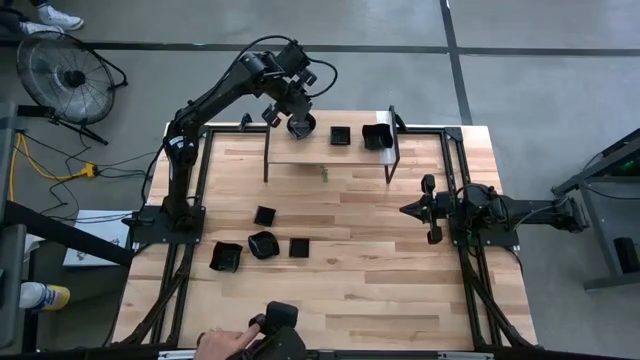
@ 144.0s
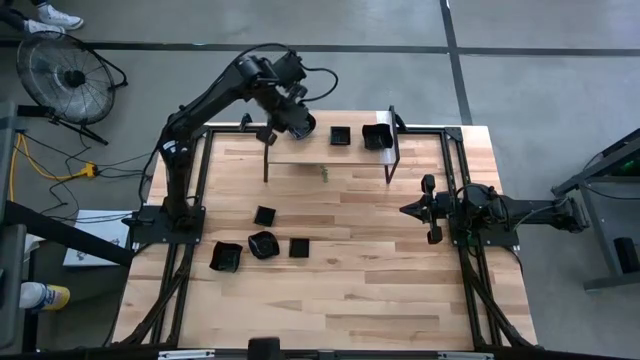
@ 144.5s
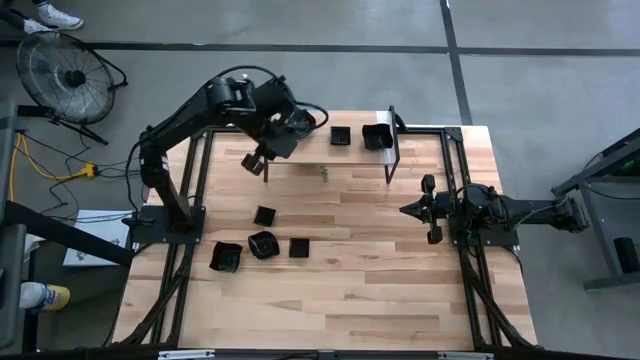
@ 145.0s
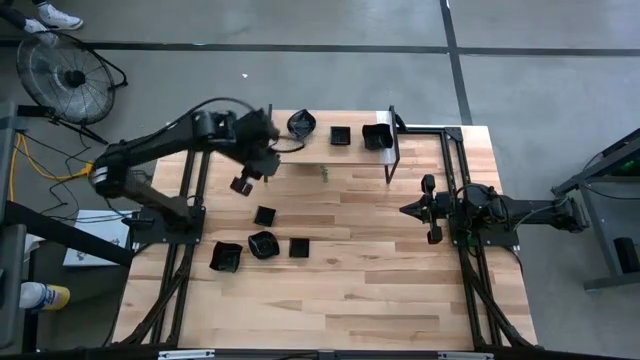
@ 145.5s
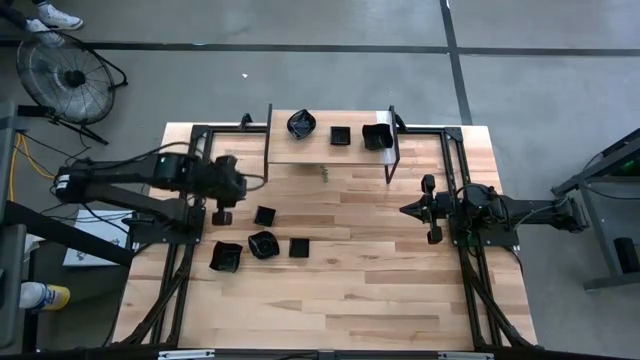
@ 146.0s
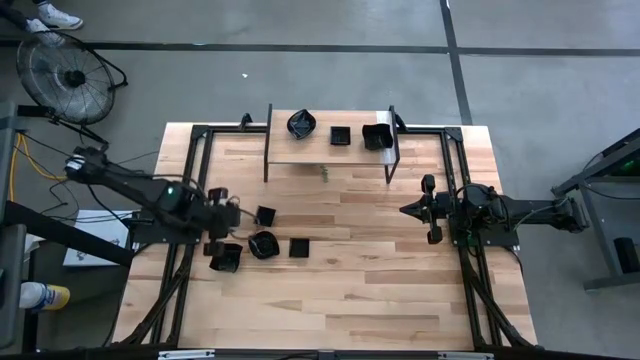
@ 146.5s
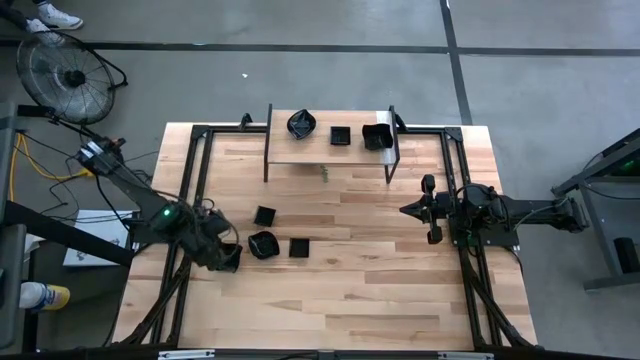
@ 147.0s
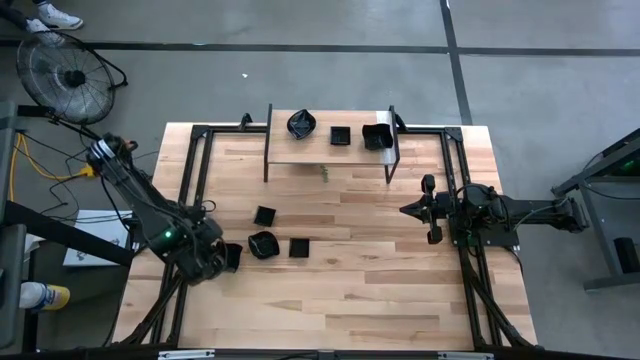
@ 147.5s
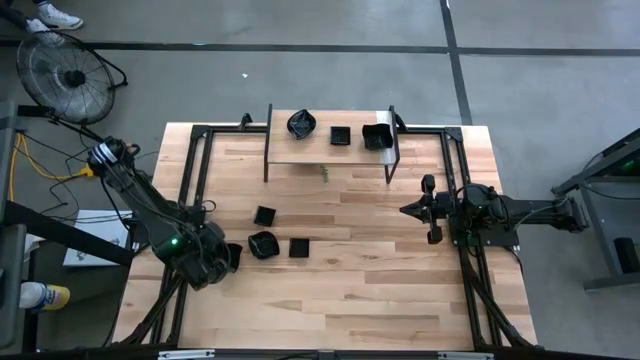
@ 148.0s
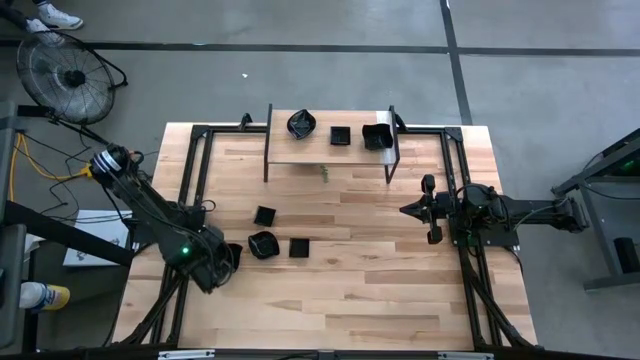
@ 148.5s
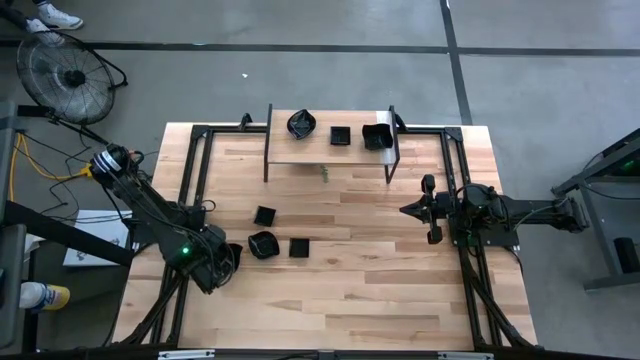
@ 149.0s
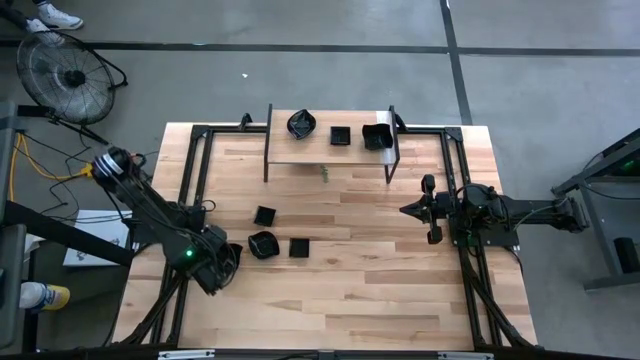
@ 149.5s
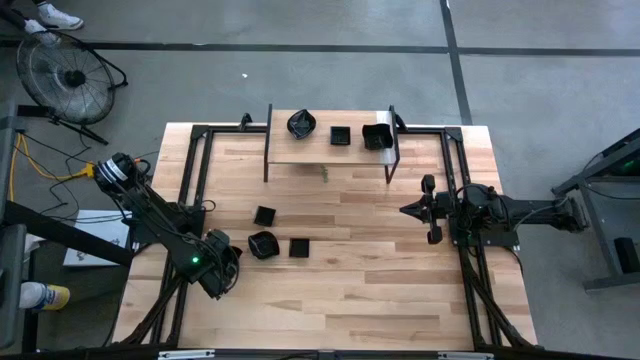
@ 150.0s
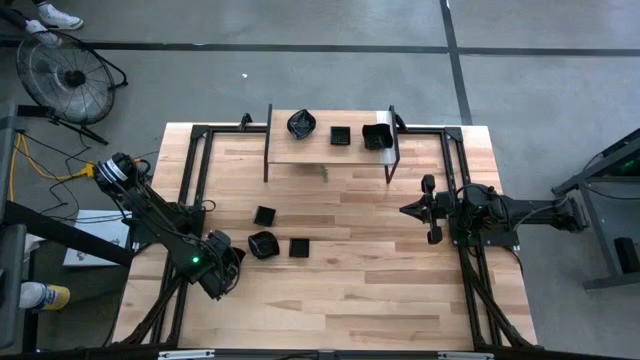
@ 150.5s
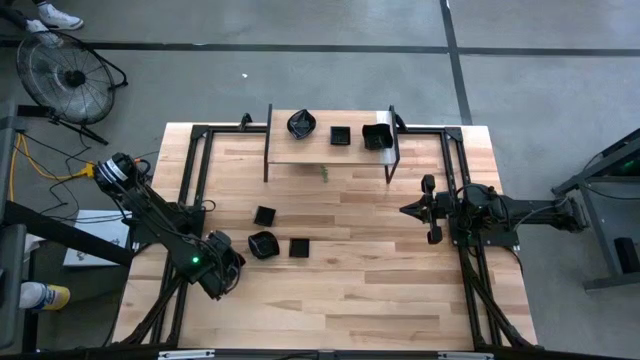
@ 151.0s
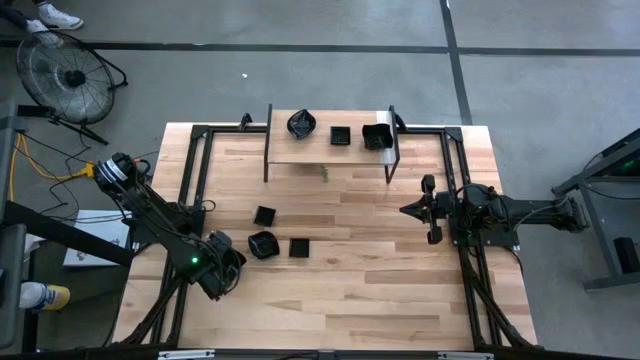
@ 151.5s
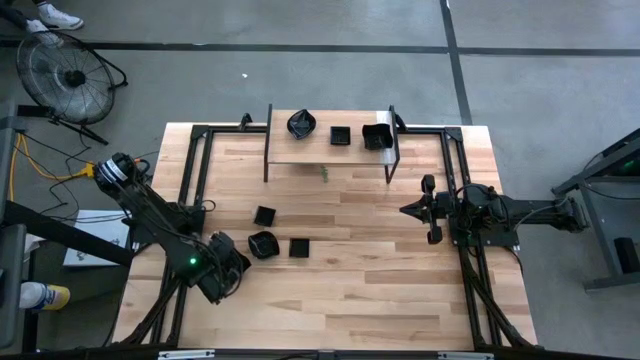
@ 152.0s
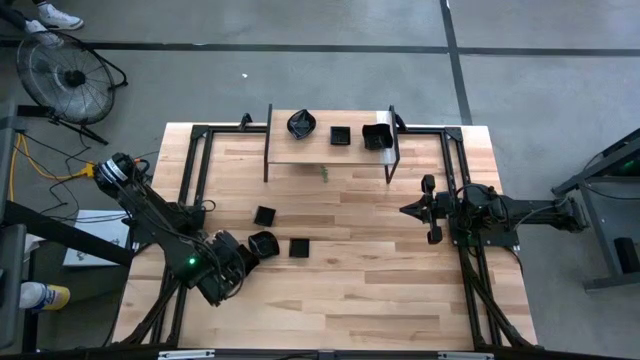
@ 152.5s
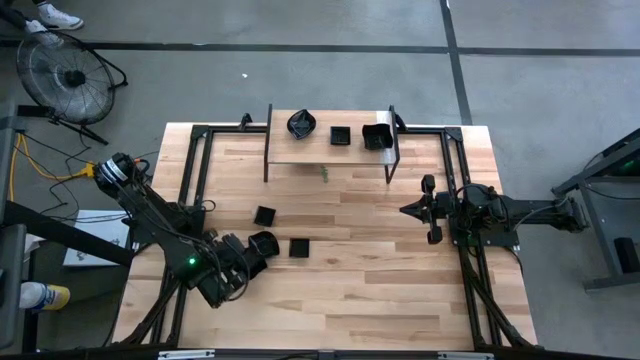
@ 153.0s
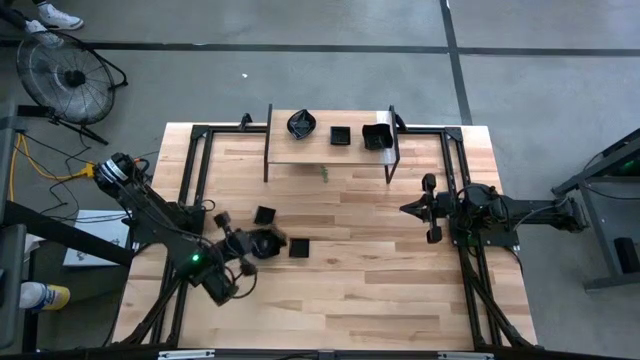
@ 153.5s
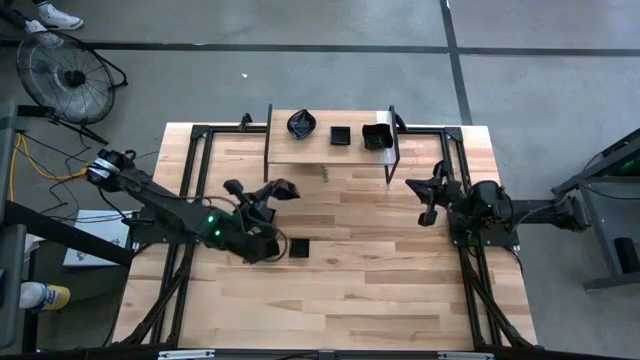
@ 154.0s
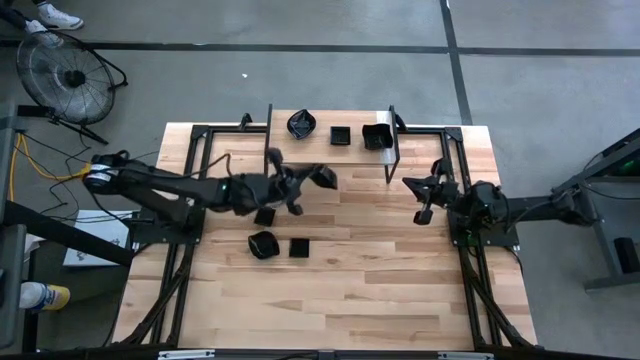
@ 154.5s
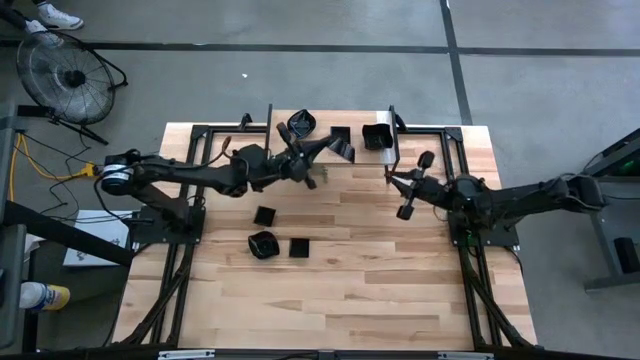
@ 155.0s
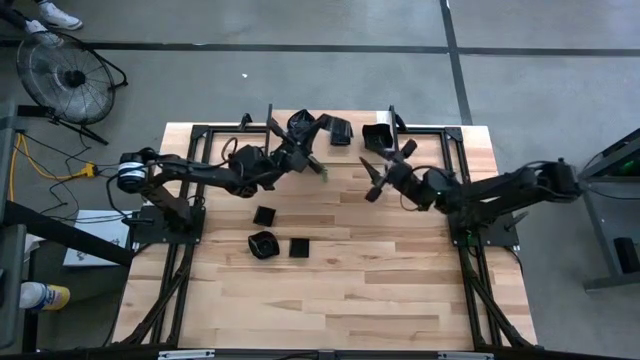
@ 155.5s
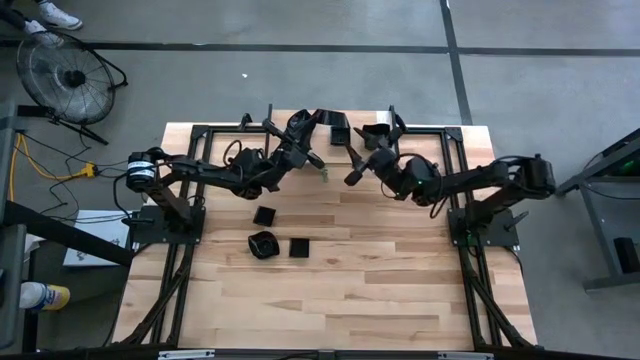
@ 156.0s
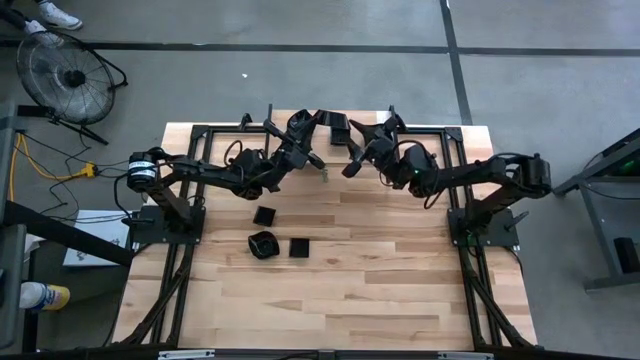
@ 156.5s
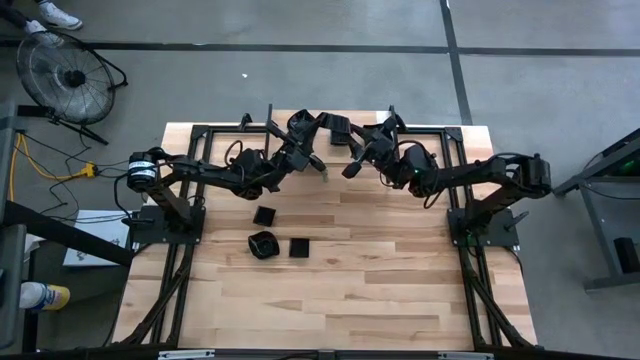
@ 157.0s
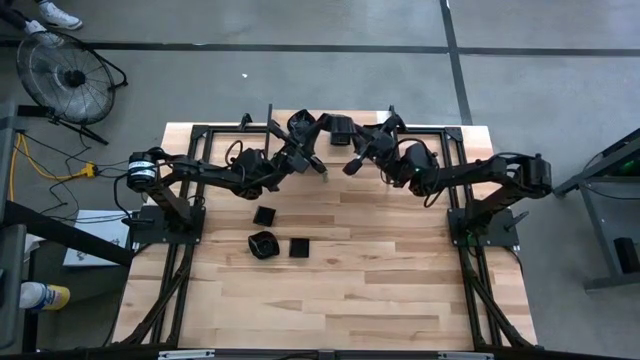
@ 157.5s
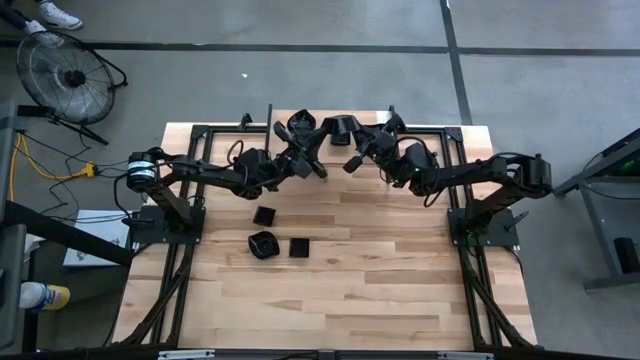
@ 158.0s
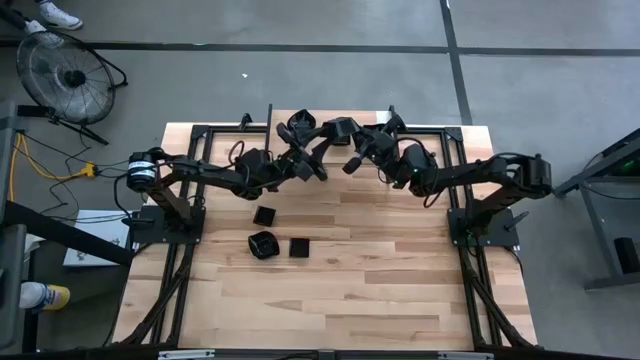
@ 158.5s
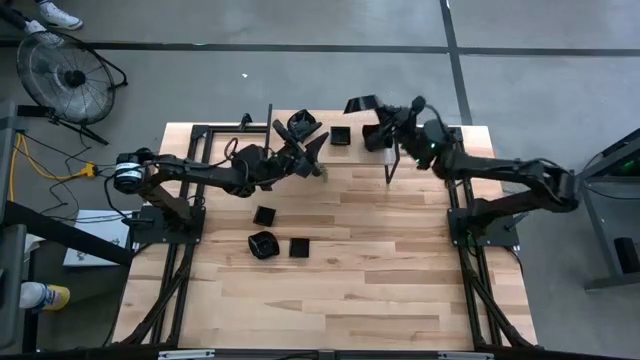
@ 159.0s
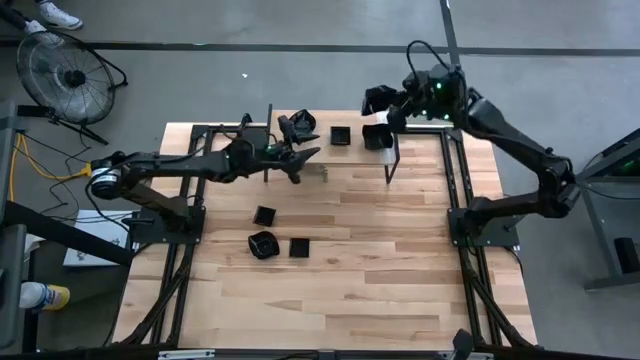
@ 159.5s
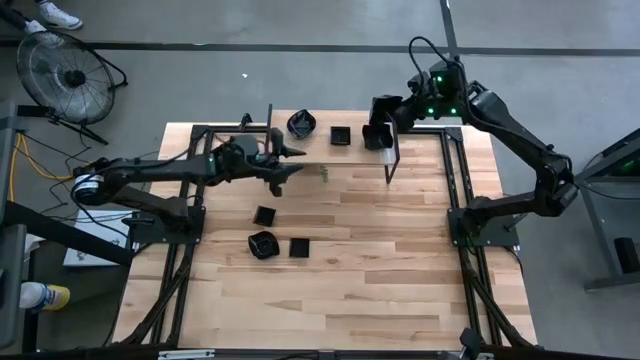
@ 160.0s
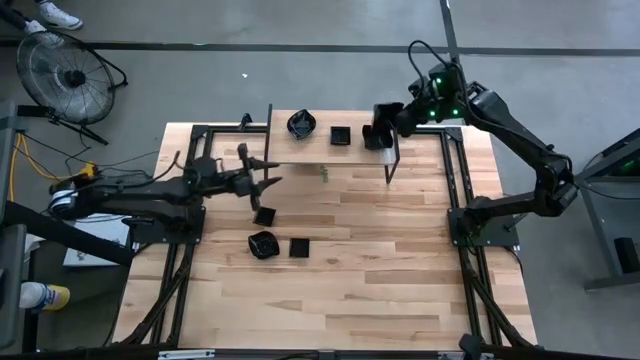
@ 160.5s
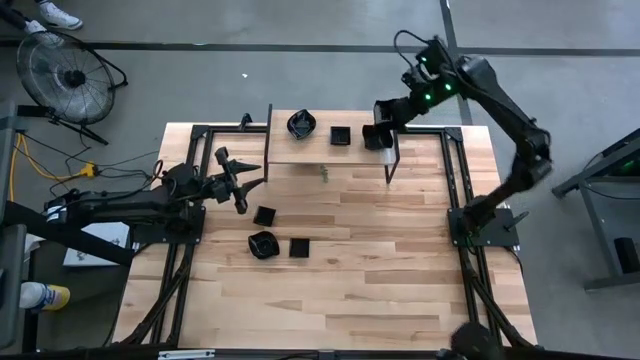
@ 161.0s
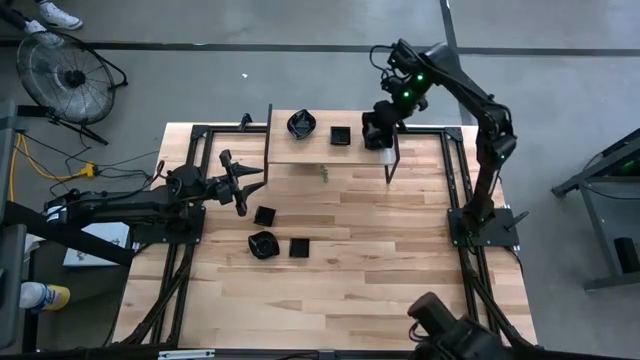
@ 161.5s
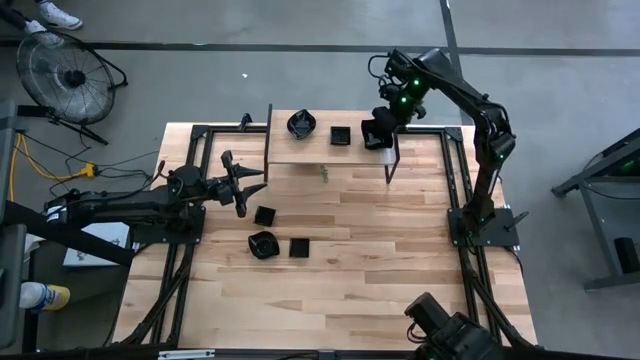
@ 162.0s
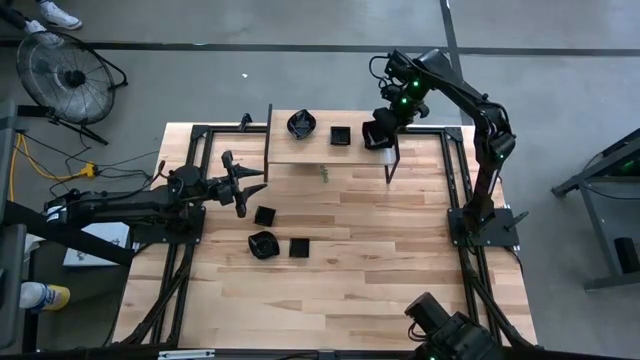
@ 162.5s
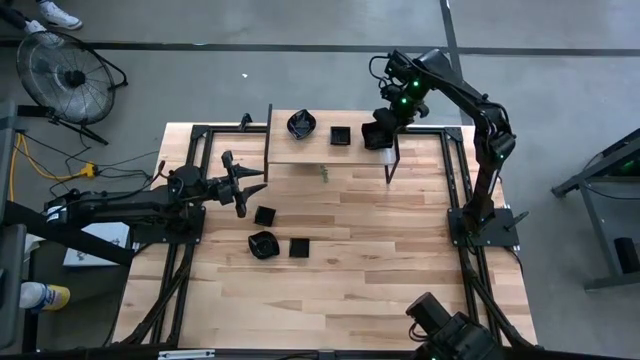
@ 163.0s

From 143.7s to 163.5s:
Task: Pick & Place Mini shaped plates
Stack the distorted square plate on top of the other distorted square plate on the shelf

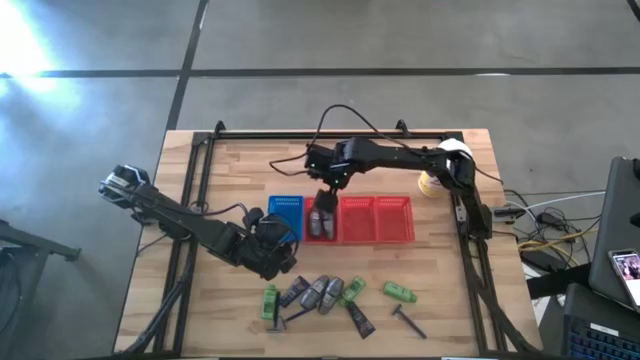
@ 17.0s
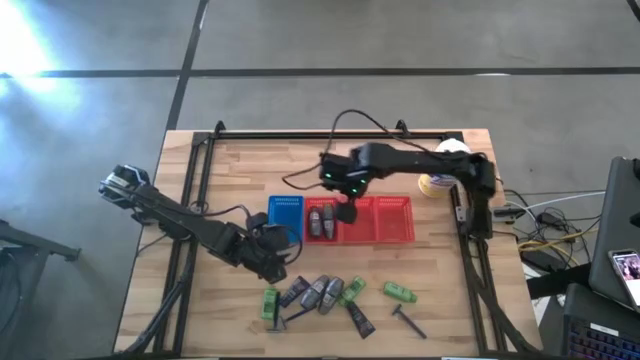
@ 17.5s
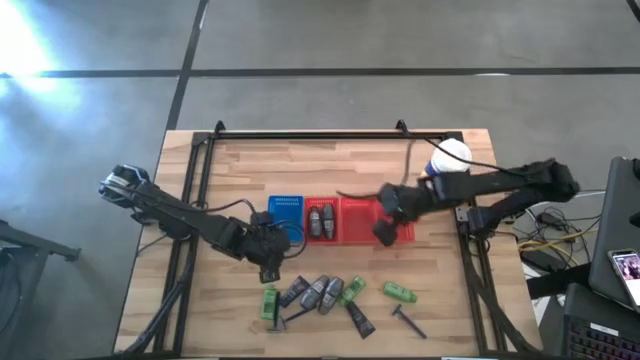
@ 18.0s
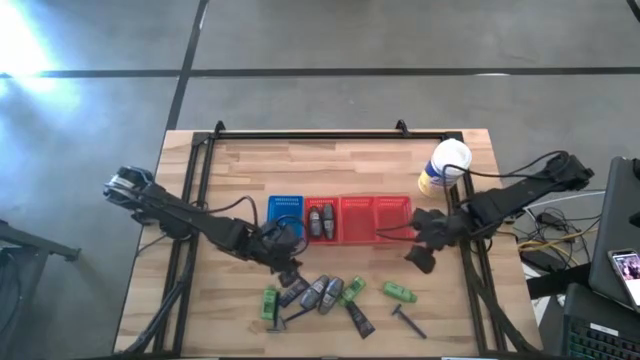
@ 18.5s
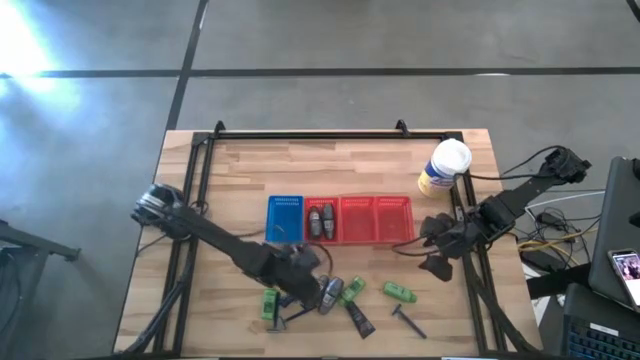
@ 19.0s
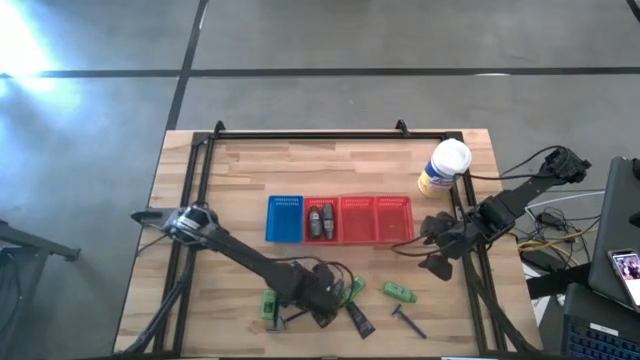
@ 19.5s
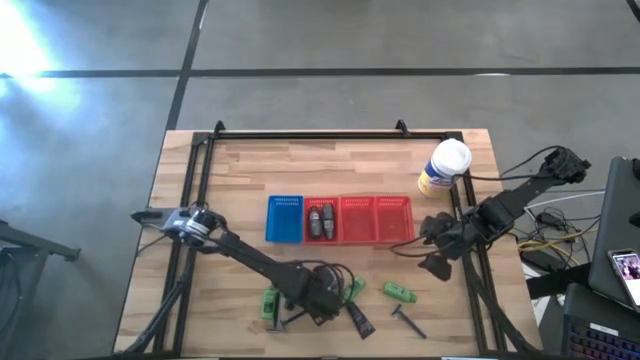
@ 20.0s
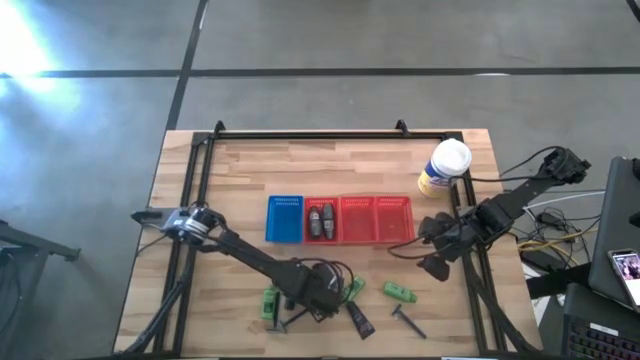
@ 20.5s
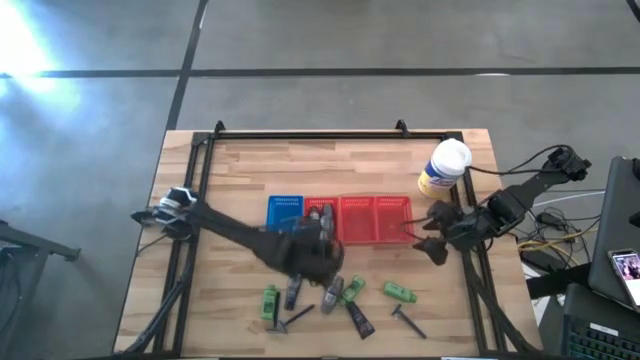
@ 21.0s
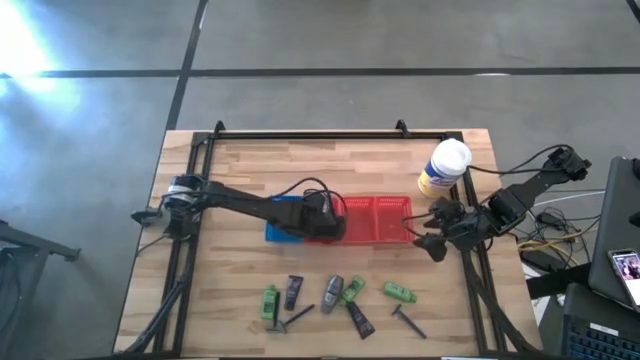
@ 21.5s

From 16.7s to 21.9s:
Task: Pick & Place Travel size toiletries
Put the black deodorant into the left red bin
